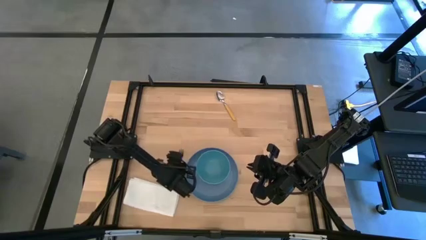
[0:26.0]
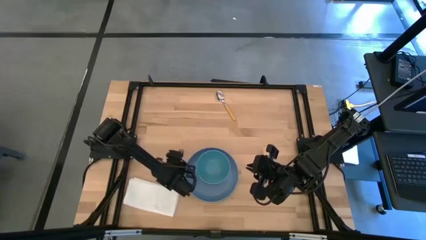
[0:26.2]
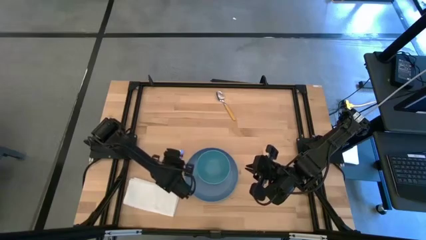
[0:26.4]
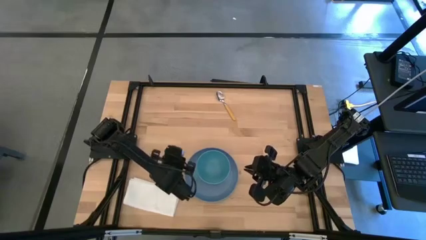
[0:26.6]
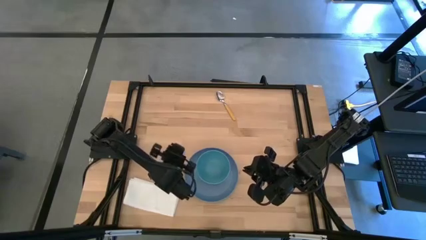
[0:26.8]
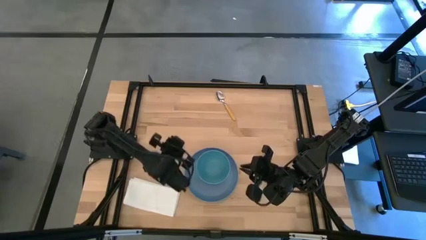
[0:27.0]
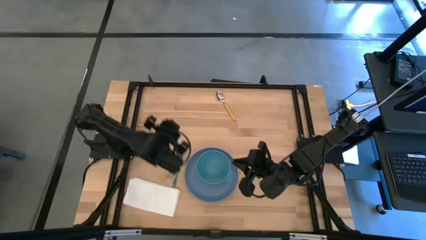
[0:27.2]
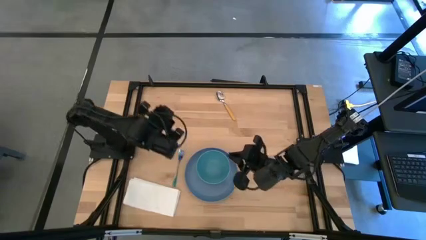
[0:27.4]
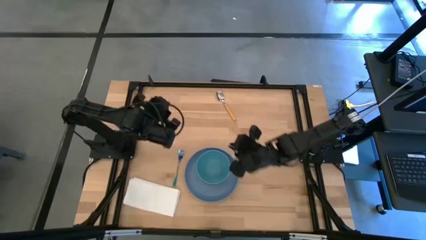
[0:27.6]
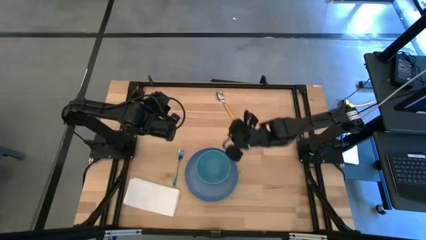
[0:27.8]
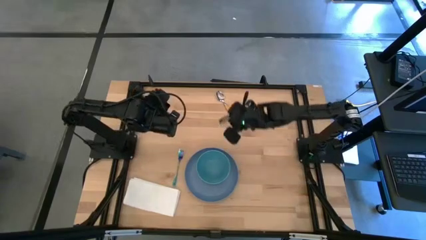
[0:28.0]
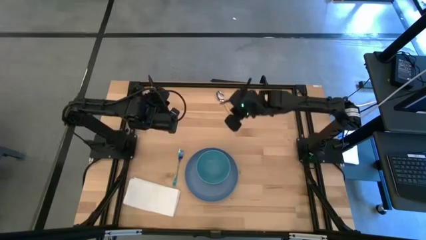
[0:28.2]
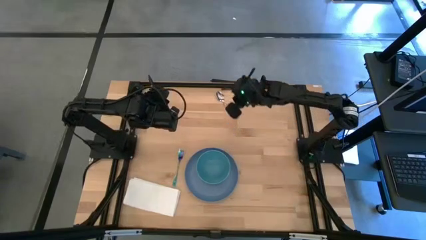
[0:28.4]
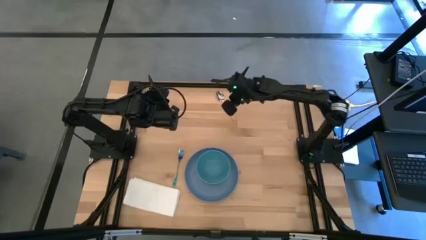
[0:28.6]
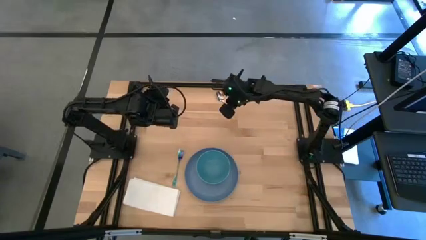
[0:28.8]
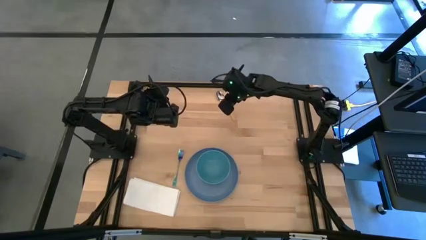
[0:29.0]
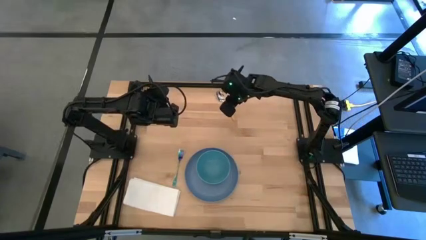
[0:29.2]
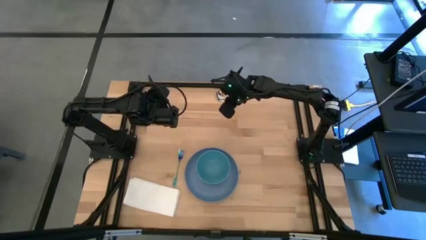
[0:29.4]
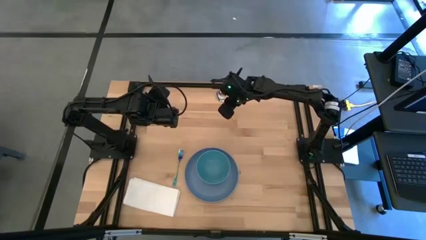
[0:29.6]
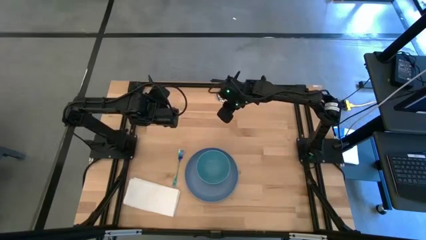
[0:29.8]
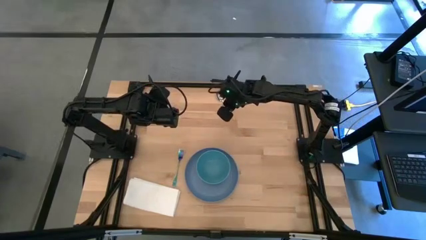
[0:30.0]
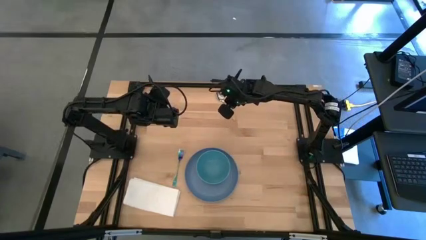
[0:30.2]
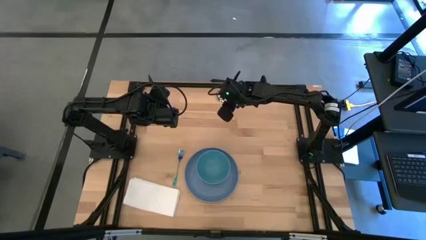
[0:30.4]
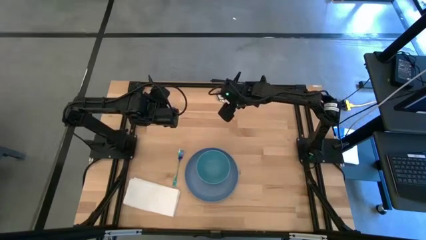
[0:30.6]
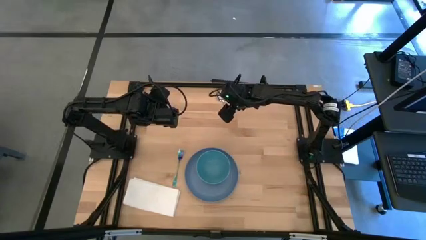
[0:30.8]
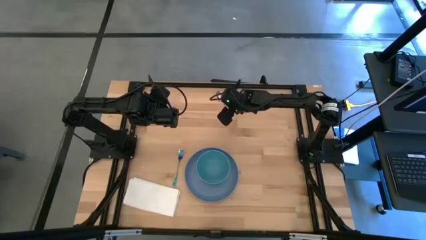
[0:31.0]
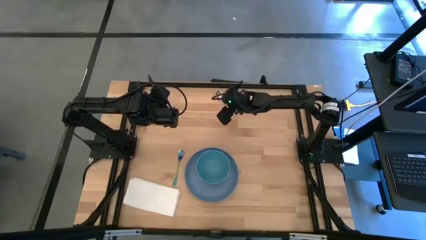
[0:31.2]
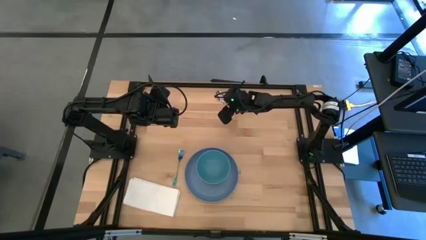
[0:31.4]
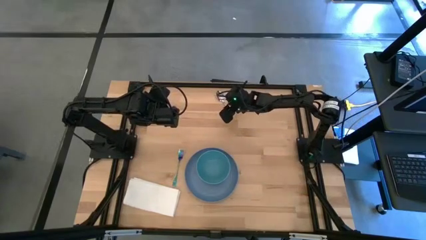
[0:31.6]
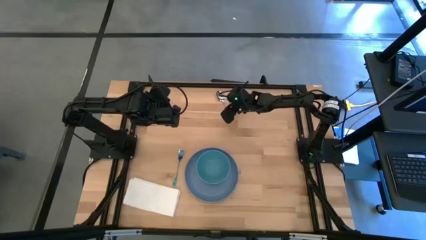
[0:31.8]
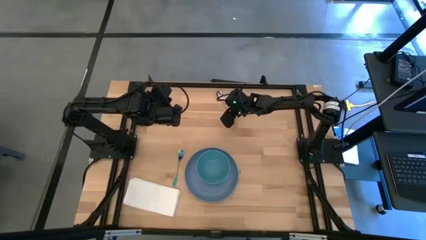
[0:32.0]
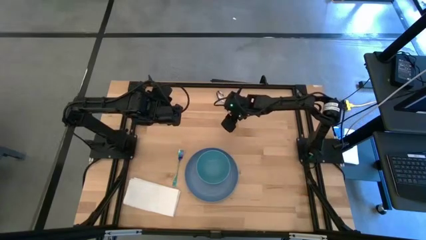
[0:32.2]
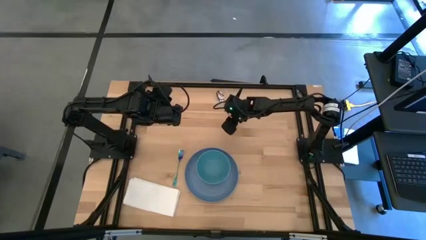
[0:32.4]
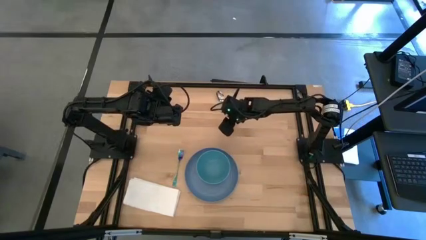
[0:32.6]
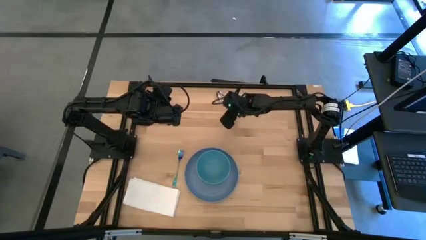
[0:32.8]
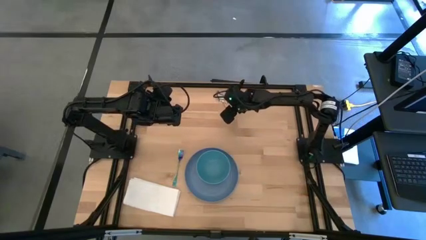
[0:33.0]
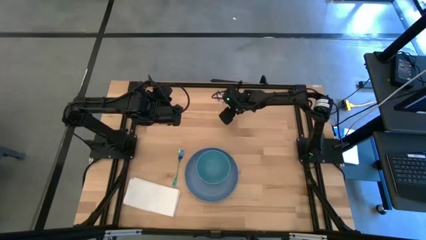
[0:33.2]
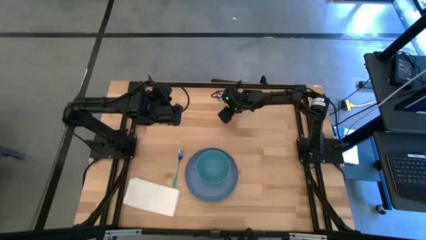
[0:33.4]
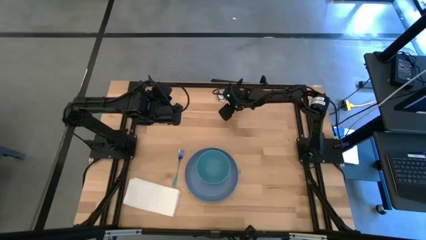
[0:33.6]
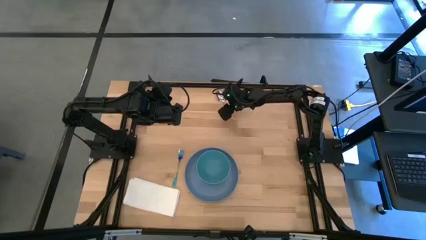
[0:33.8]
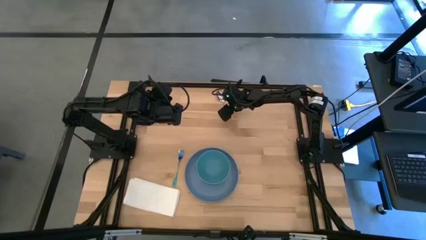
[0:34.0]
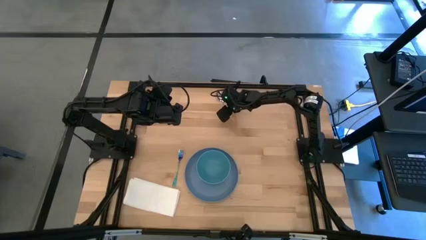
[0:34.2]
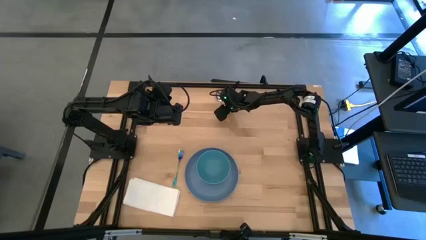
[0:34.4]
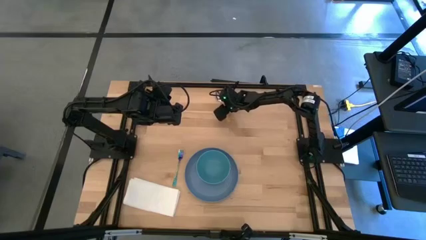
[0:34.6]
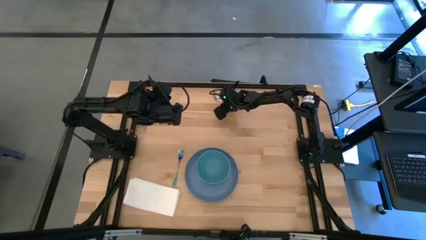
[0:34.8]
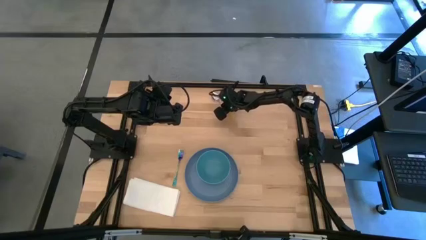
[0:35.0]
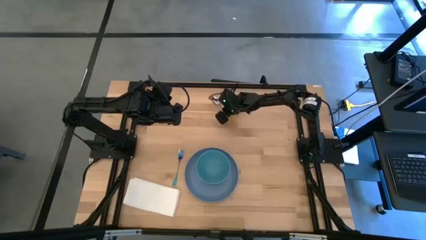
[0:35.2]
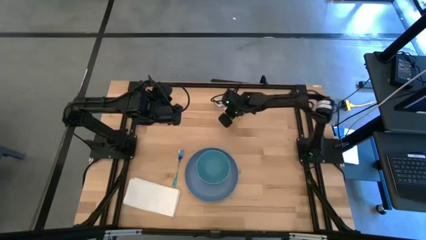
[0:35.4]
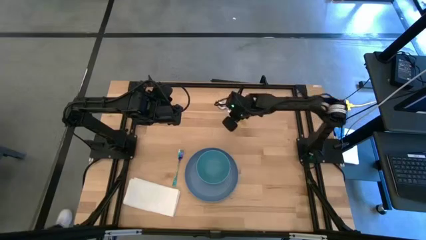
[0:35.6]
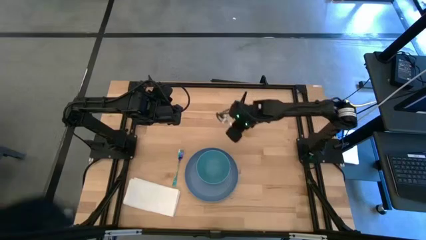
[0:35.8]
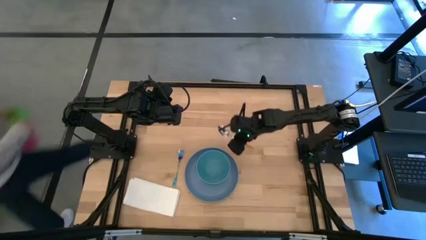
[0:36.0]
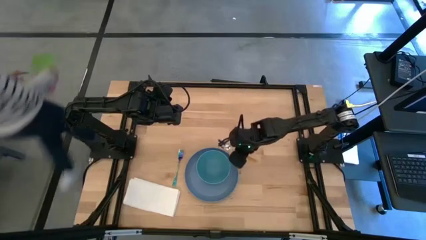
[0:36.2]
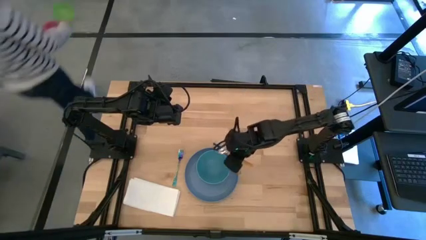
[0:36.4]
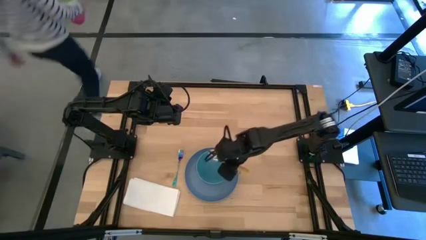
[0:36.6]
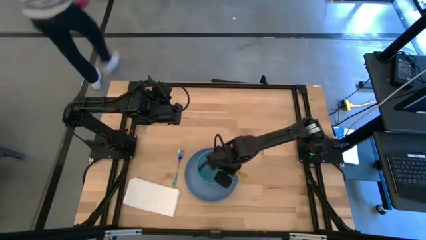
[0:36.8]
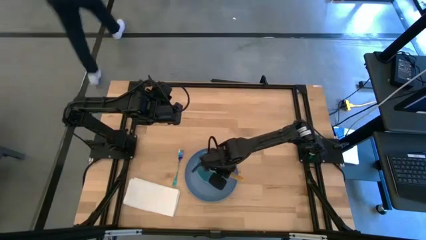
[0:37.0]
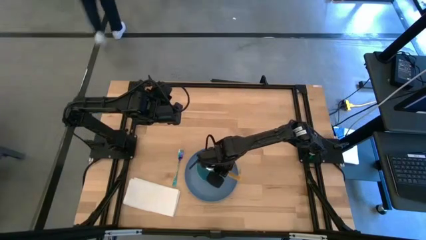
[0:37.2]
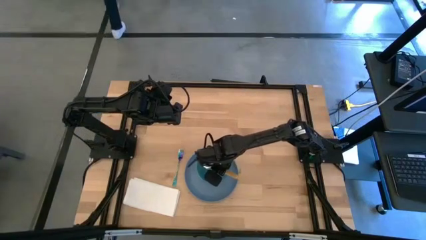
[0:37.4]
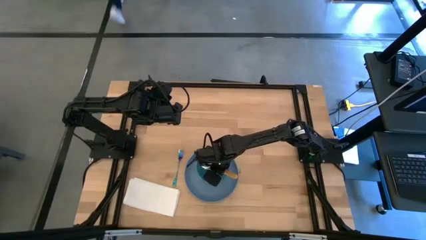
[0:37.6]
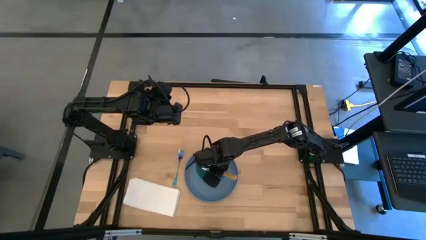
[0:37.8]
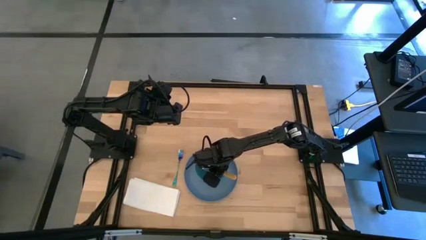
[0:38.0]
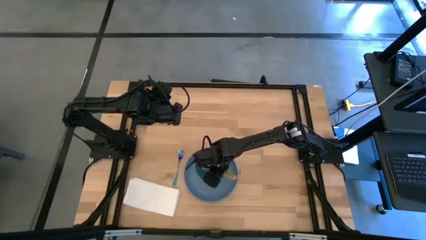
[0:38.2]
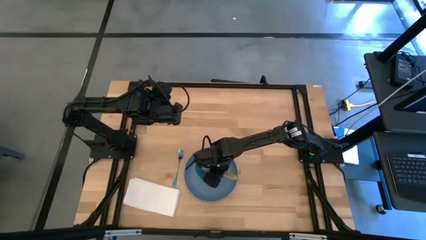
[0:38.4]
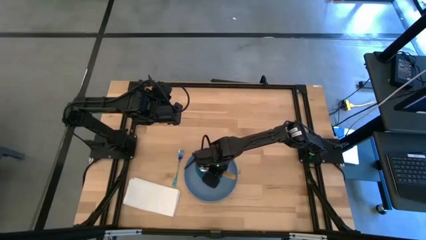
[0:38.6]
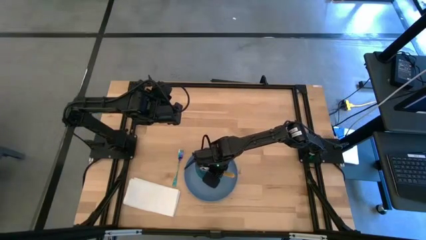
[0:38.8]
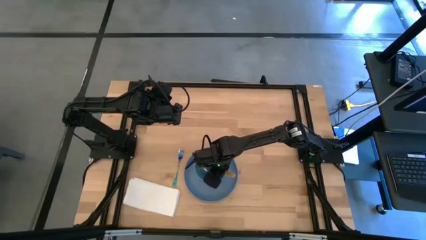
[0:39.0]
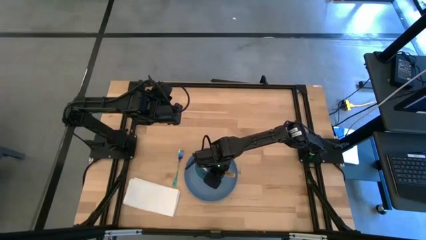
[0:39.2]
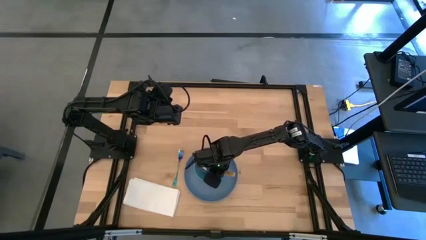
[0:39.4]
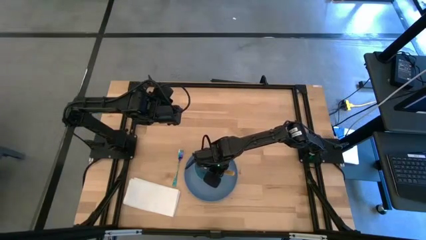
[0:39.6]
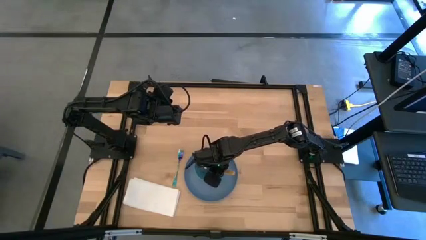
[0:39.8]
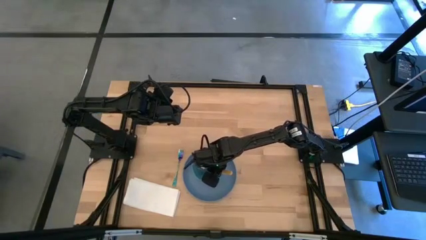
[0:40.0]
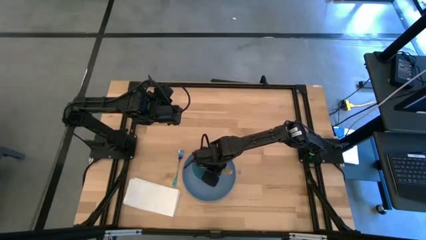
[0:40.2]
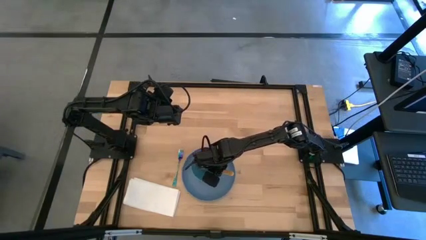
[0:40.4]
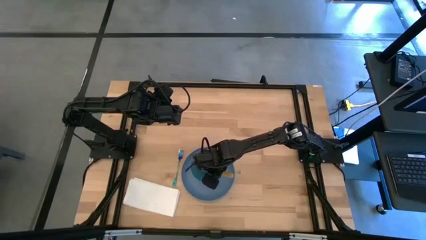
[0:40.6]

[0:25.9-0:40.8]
Task: Set table place
Put the spoon into the bowl
